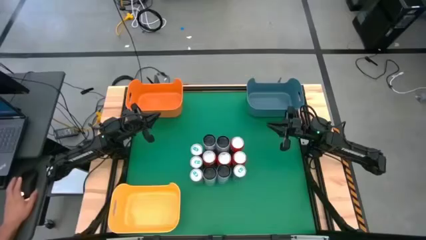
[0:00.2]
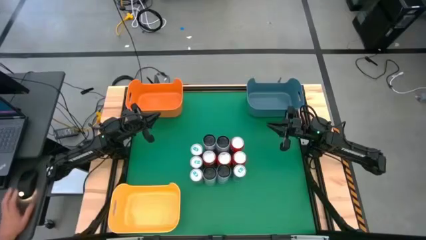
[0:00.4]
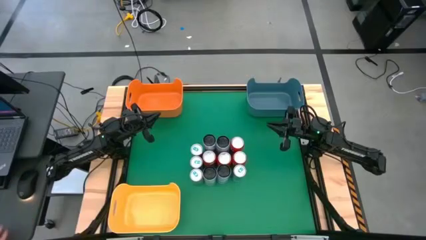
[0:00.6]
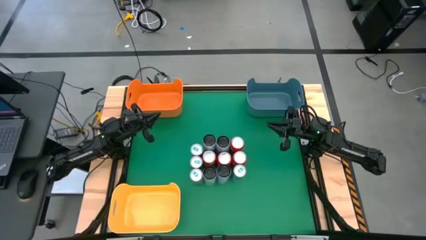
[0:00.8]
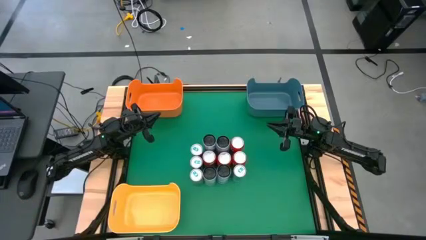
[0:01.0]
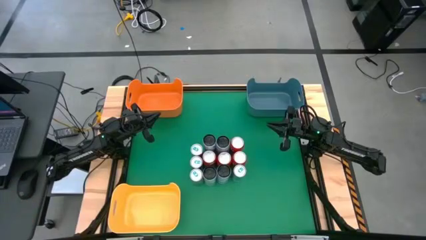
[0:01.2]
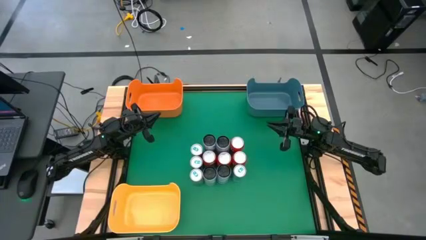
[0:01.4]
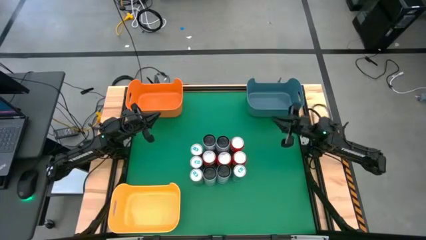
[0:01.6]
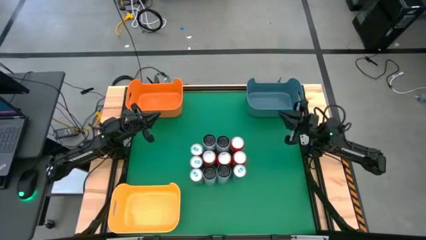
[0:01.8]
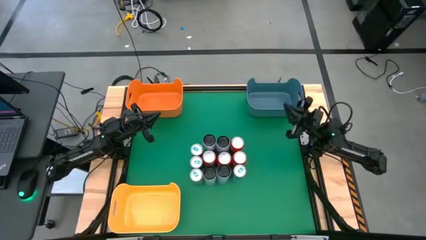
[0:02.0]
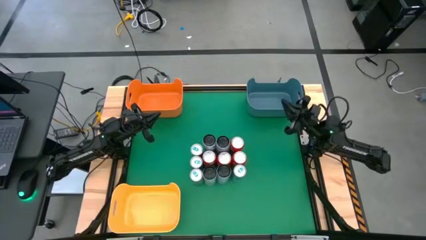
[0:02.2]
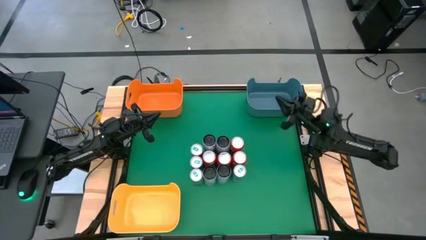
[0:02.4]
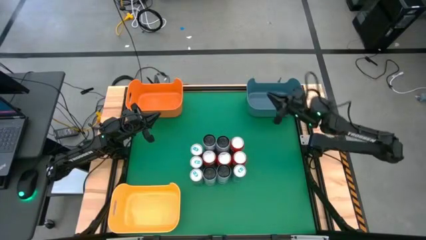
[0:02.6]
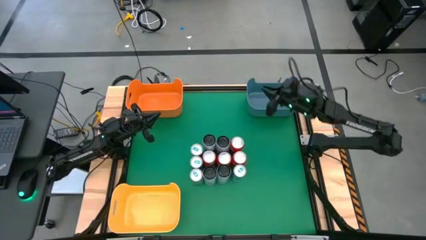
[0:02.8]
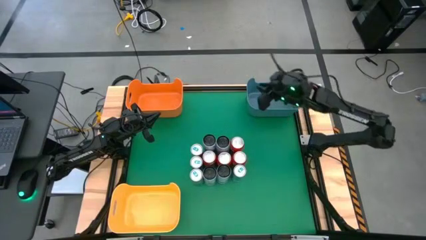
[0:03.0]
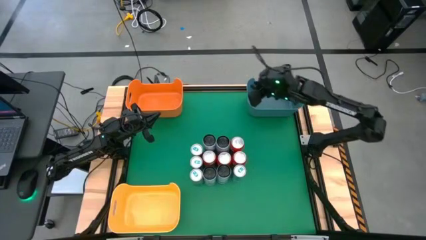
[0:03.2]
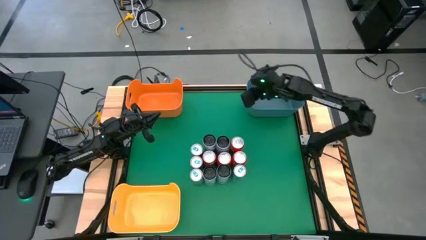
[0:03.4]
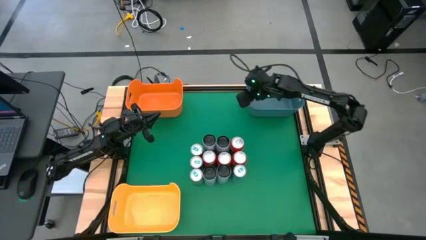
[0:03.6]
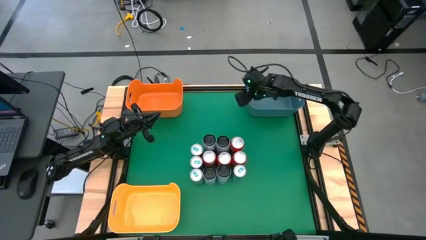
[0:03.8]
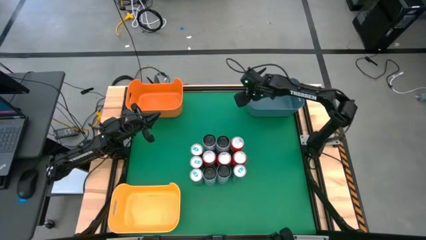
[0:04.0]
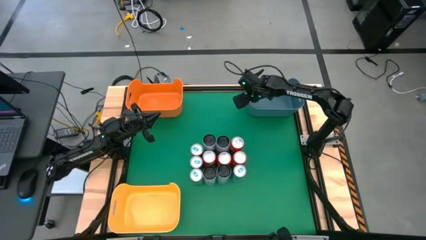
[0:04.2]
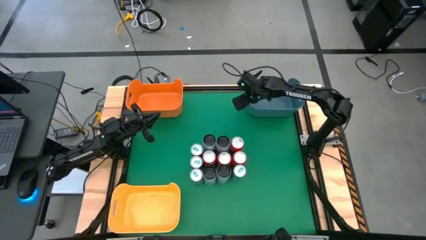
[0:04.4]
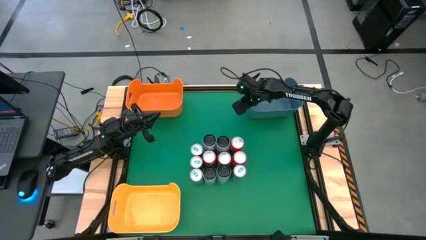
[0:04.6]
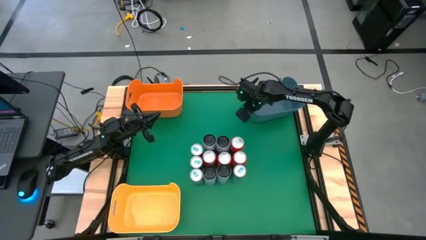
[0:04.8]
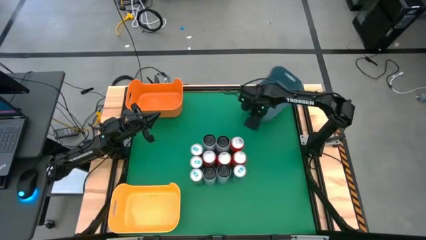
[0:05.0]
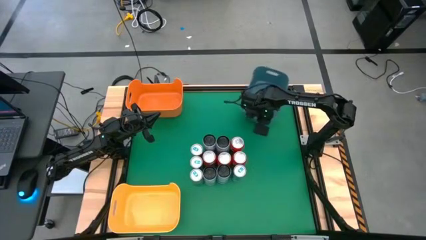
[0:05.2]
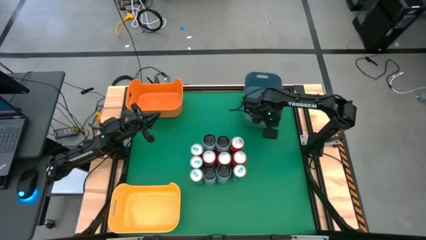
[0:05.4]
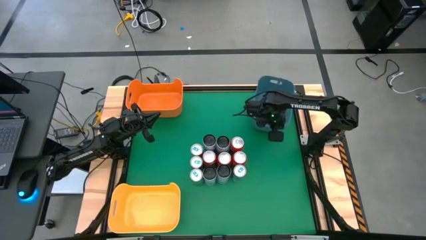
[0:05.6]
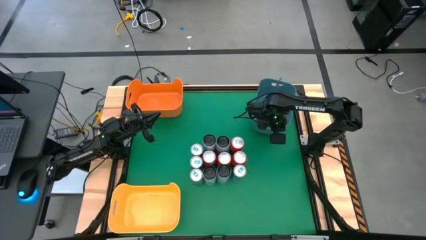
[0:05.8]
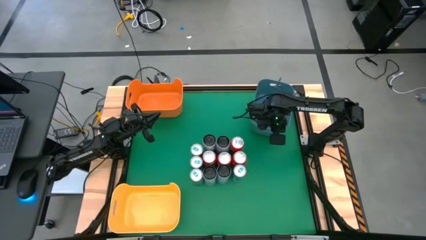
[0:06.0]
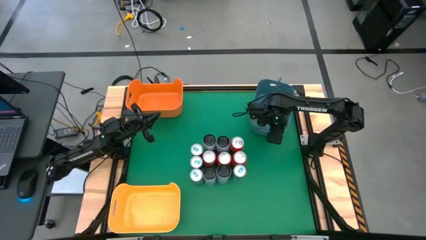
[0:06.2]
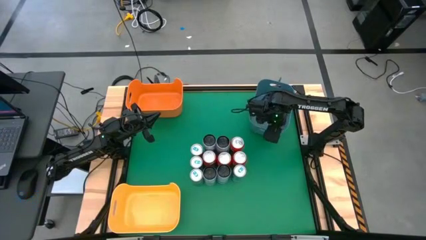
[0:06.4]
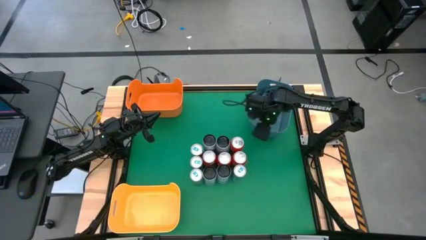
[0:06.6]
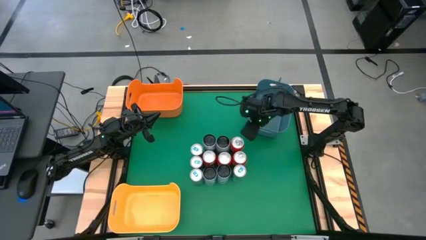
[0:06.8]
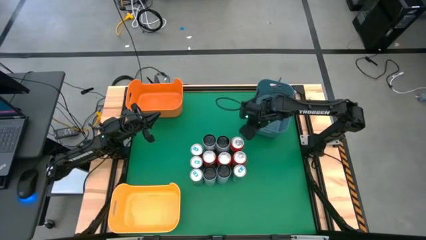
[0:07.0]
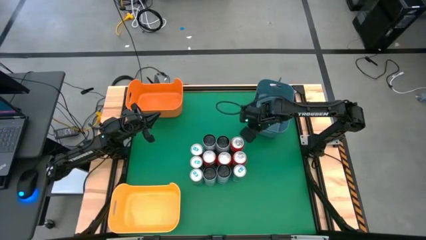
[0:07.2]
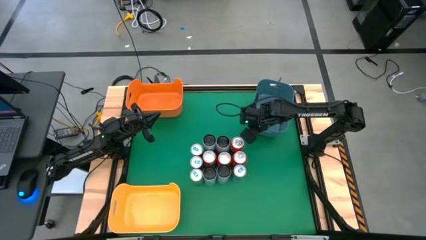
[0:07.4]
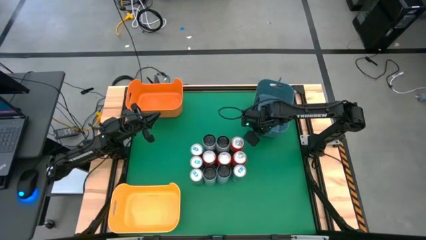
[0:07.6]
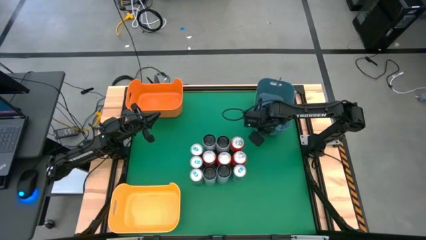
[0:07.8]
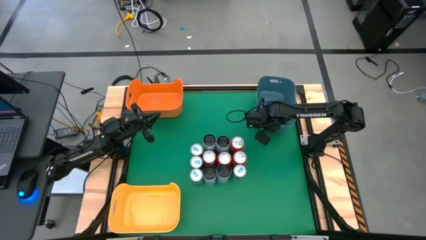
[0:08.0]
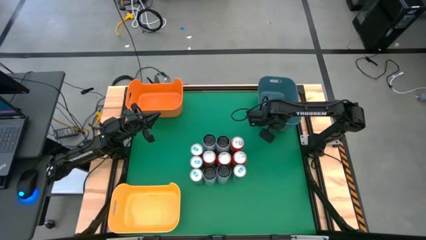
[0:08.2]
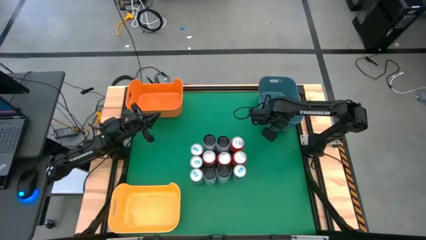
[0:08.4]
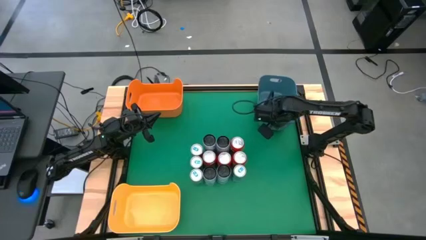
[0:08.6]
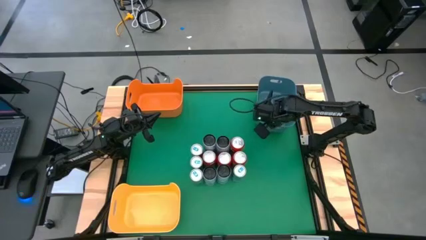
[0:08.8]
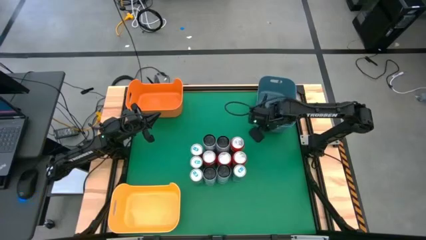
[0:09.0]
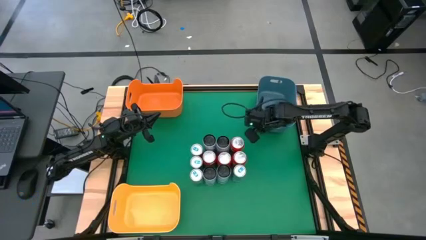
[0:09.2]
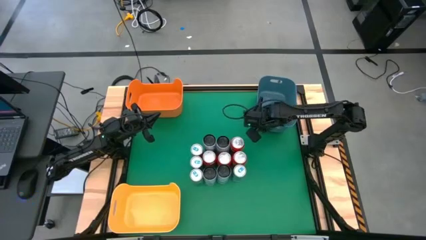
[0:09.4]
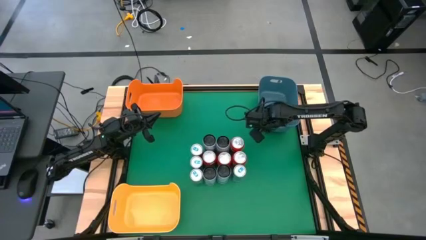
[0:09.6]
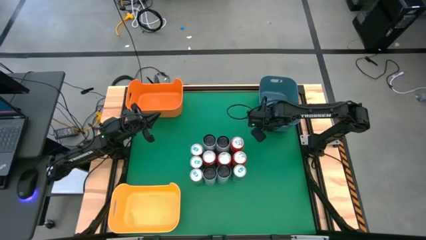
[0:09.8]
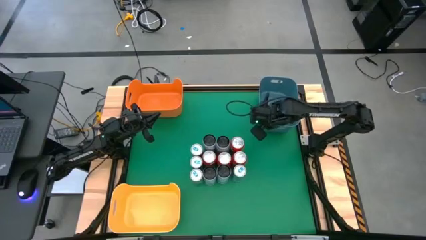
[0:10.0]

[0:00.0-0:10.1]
Task: Sort soda cans
Adjust the blue bin

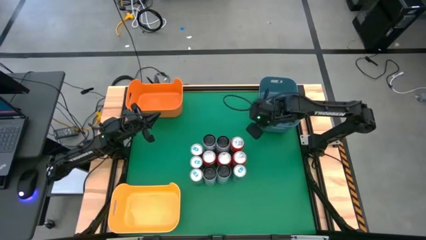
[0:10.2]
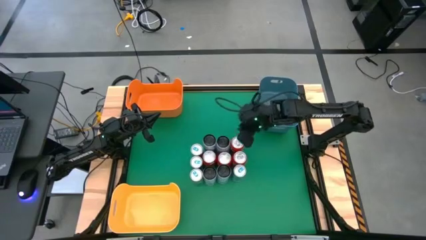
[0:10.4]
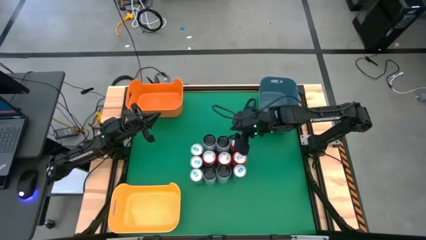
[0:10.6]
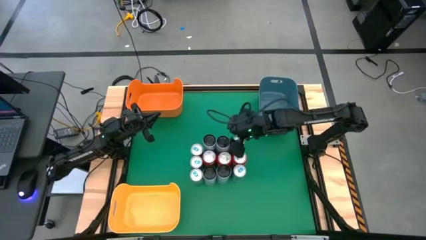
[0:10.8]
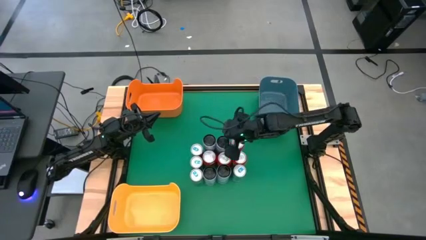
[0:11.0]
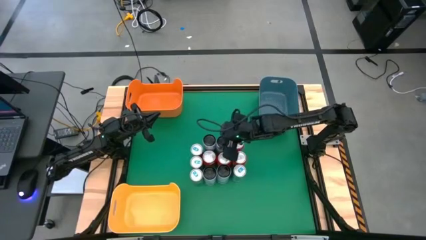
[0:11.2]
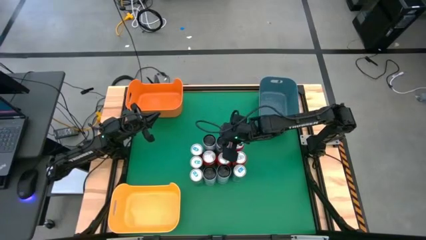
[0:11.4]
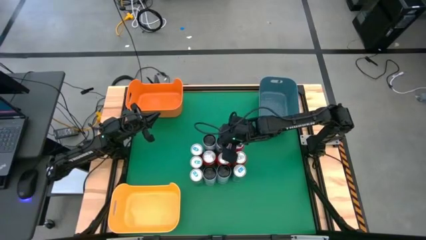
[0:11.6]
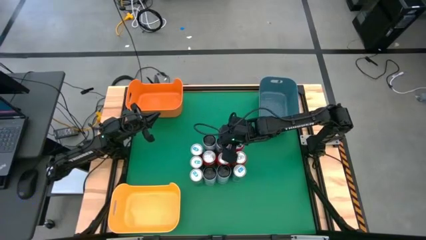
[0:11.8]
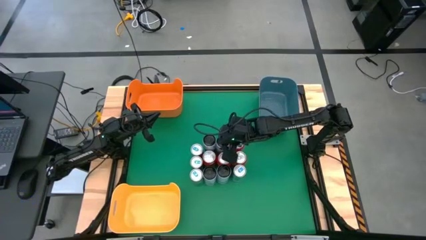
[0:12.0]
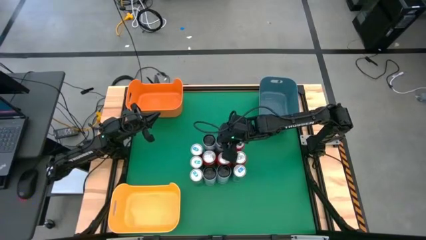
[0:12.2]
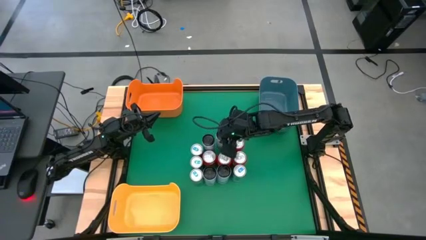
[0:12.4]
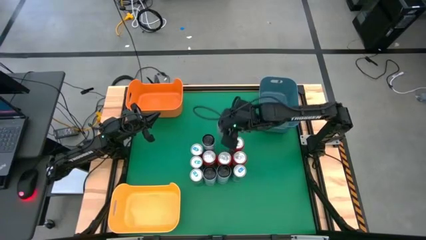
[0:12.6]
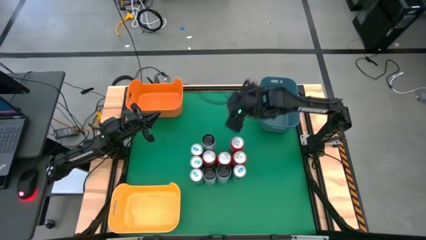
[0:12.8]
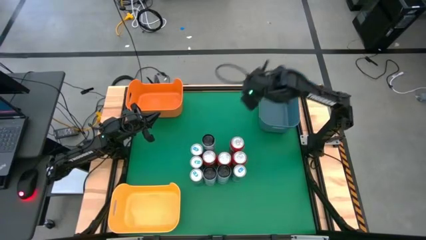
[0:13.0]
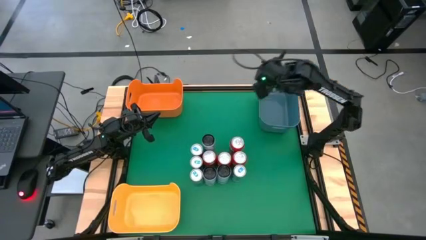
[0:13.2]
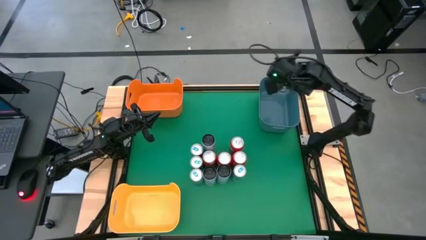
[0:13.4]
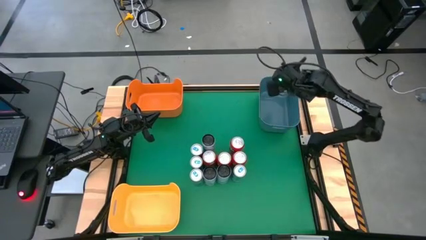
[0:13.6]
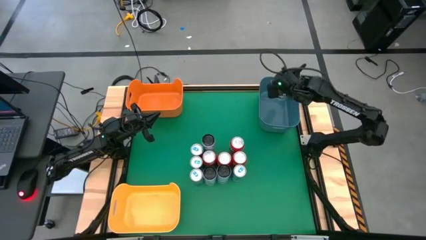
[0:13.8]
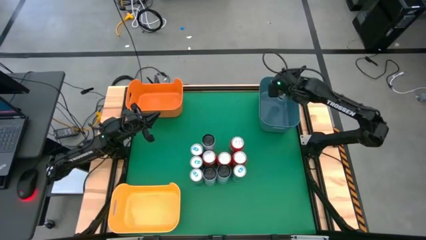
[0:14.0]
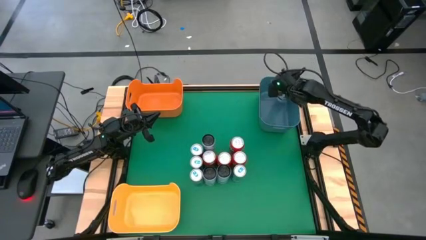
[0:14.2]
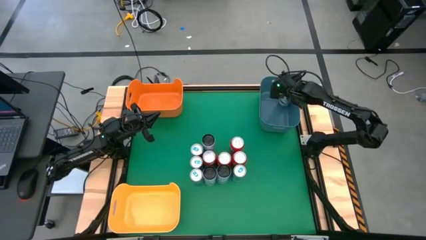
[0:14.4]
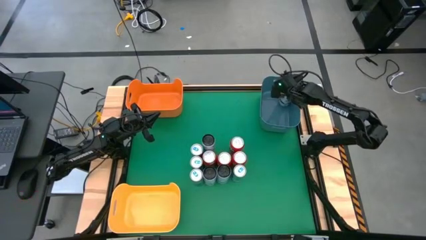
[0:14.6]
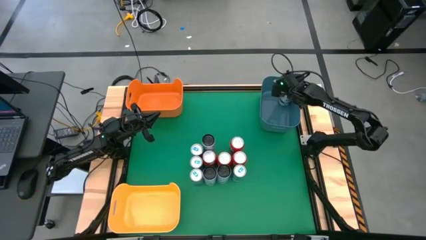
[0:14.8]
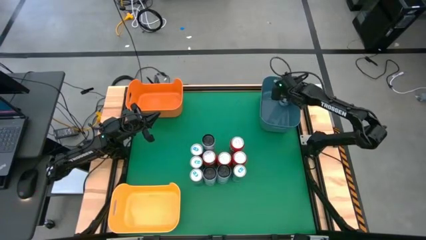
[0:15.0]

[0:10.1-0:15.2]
Put the white-blue soda can into the blue bin
